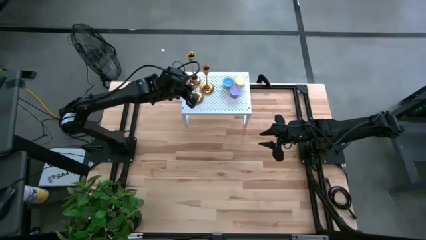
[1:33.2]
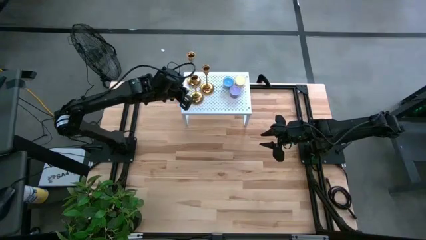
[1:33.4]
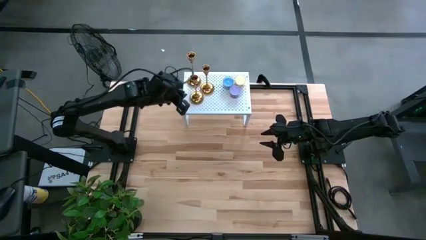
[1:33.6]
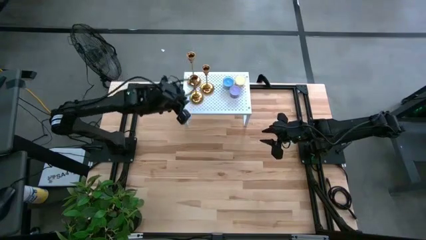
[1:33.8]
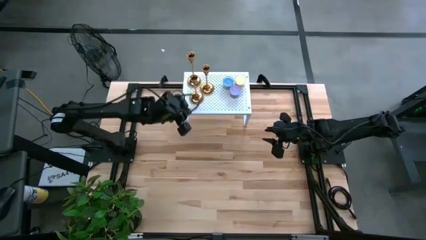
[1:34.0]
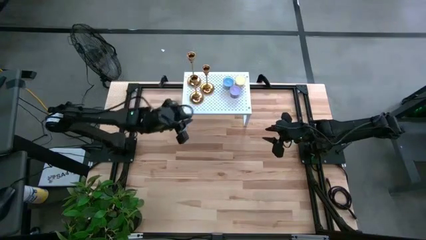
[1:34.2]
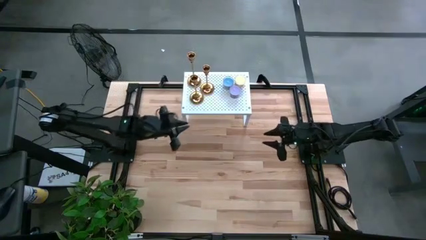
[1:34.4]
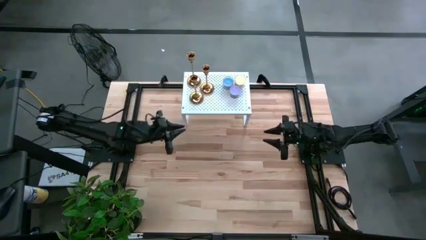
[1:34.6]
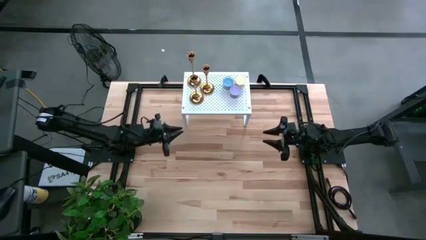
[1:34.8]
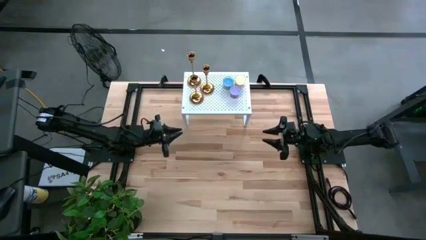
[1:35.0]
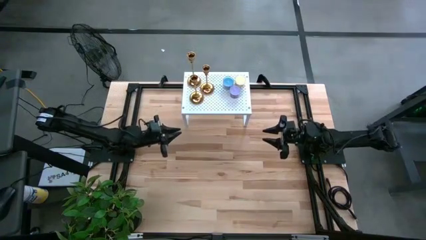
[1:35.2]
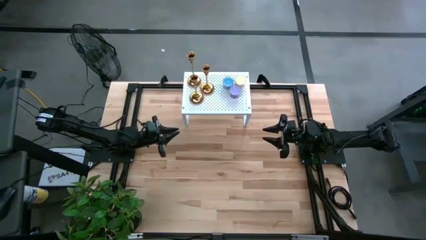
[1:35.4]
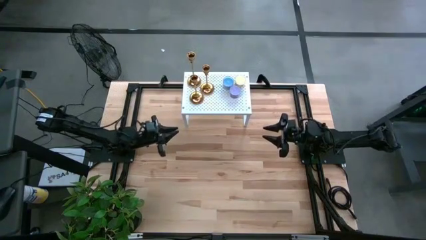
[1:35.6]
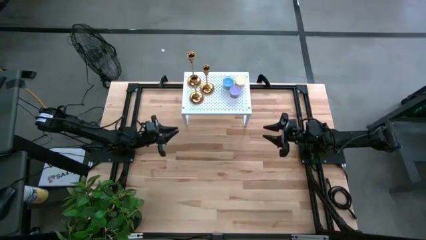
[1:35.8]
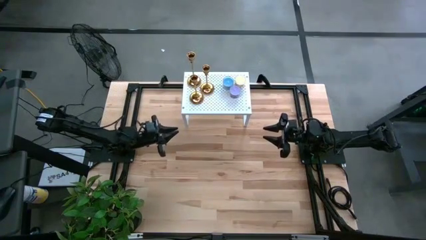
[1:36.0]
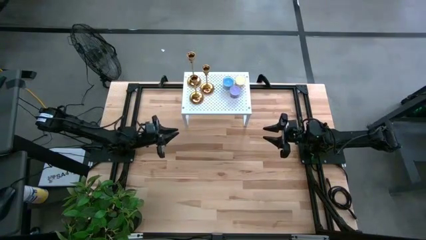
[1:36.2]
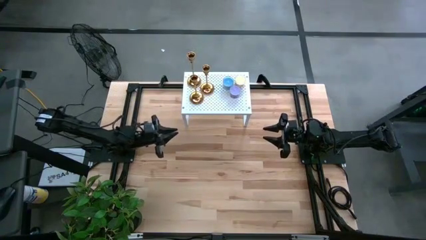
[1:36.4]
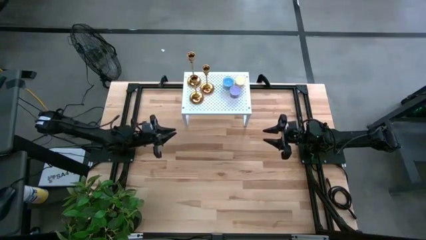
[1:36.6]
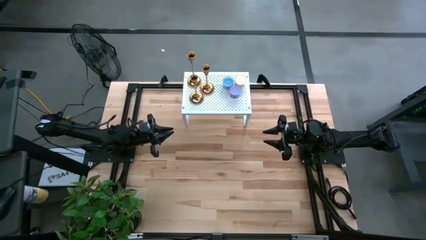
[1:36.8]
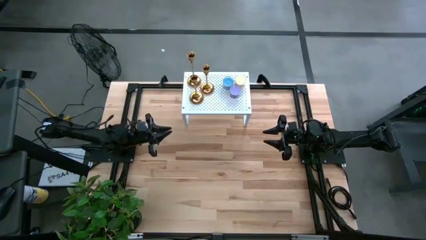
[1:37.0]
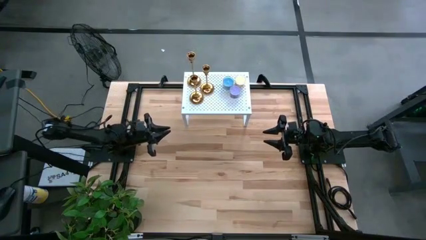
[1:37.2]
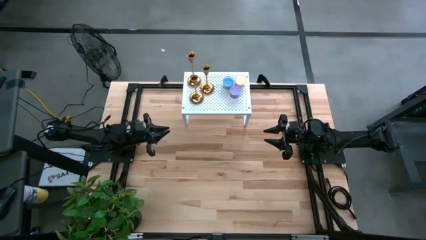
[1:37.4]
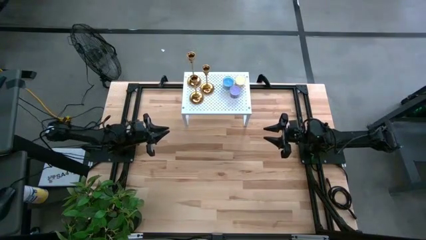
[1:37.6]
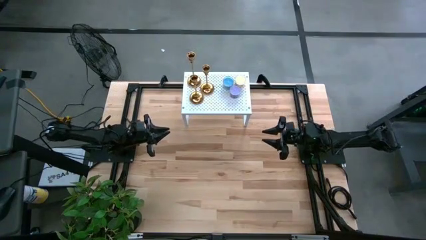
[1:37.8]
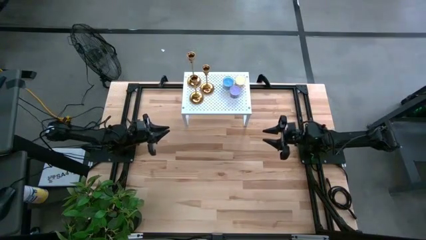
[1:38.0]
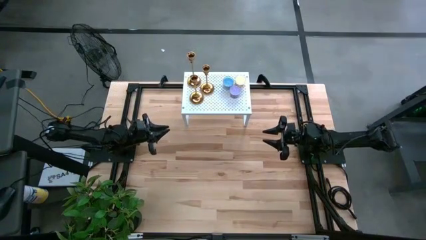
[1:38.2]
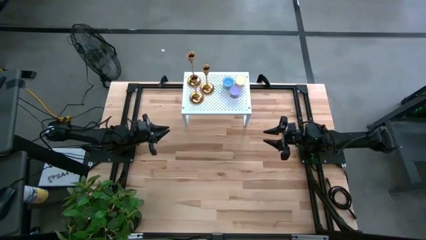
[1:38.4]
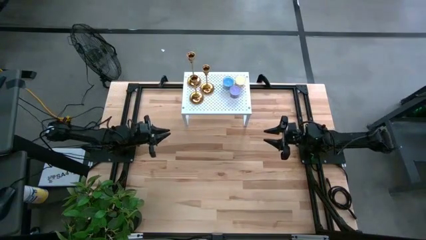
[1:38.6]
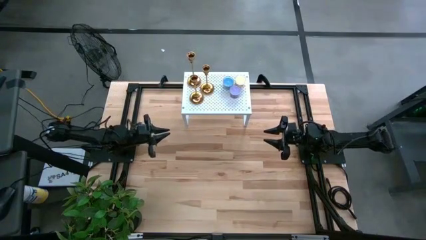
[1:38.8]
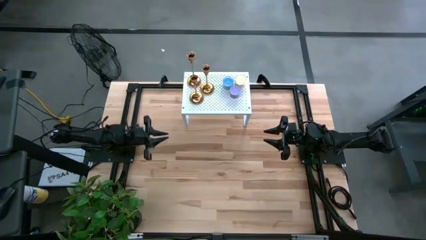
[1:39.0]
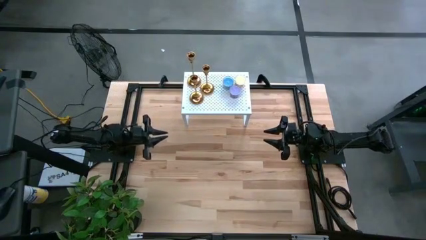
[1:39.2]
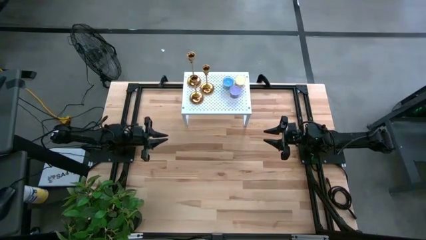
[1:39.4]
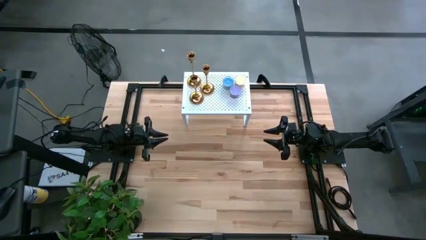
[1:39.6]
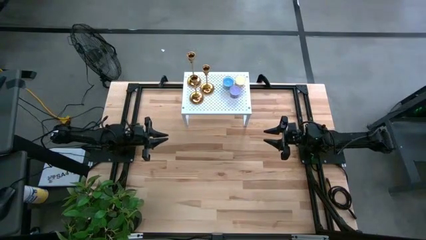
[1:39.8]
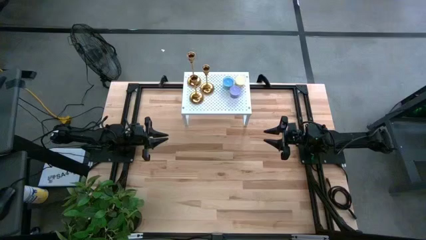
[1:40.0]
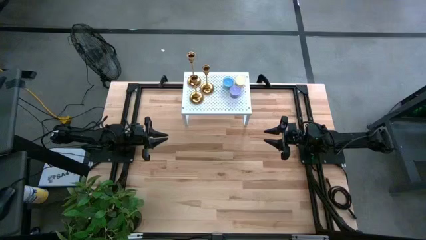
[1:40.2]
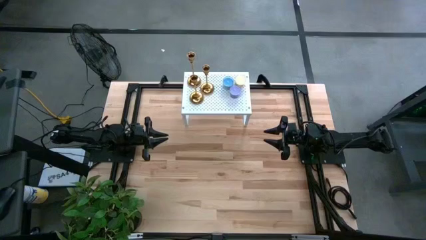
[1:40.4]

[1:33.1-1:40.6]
Task: Pick & Place candle stick holders
Return to Home Position

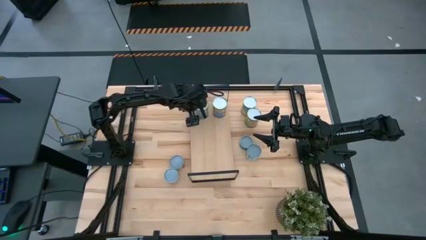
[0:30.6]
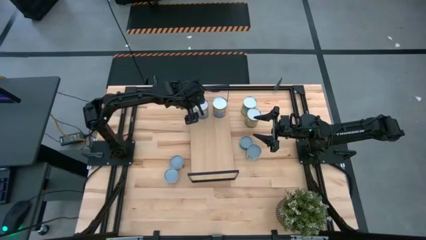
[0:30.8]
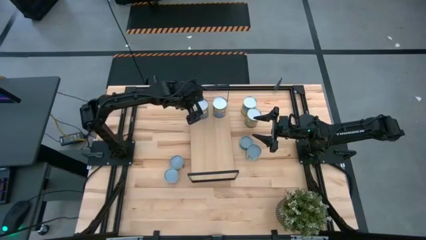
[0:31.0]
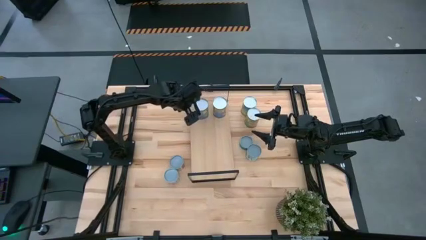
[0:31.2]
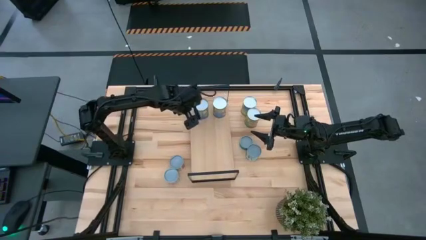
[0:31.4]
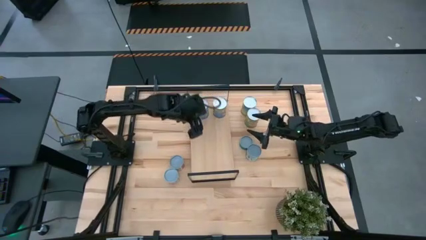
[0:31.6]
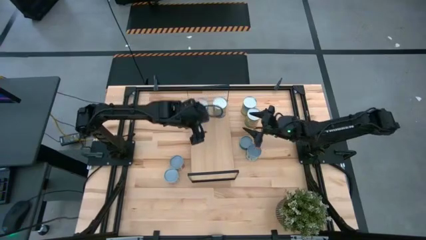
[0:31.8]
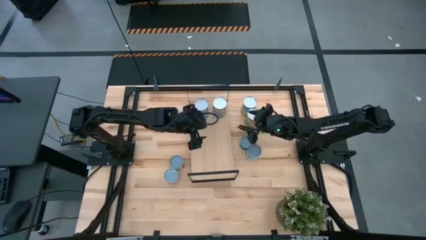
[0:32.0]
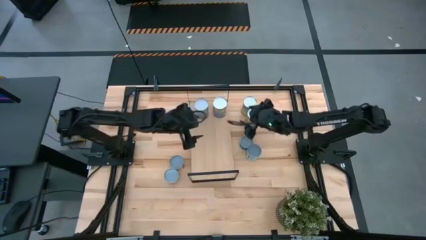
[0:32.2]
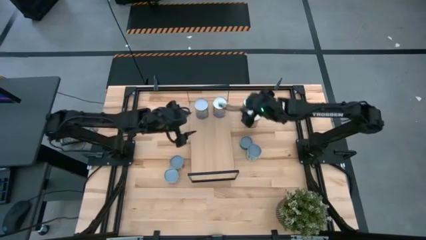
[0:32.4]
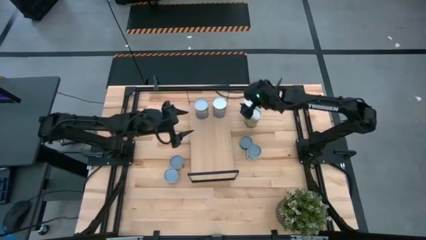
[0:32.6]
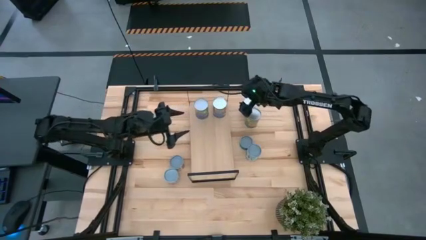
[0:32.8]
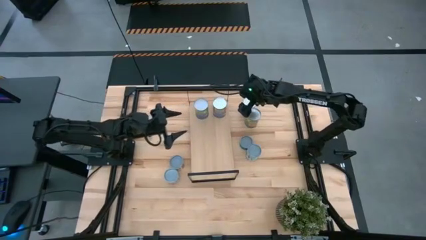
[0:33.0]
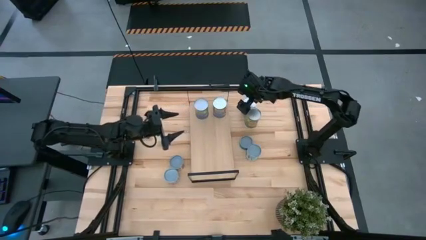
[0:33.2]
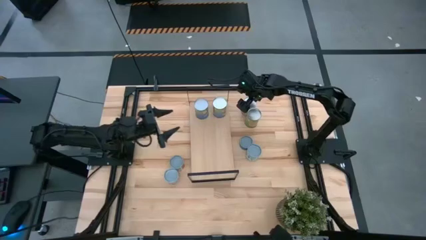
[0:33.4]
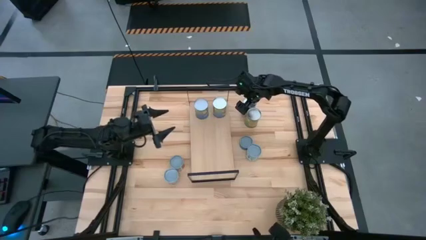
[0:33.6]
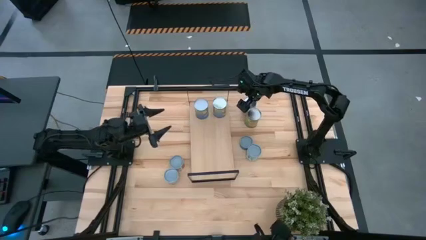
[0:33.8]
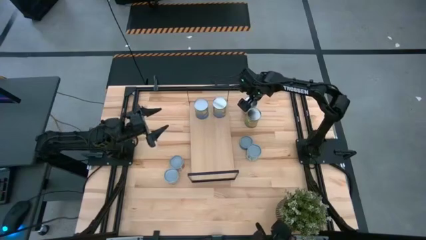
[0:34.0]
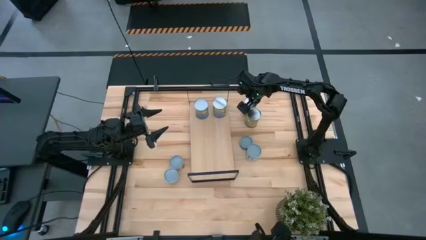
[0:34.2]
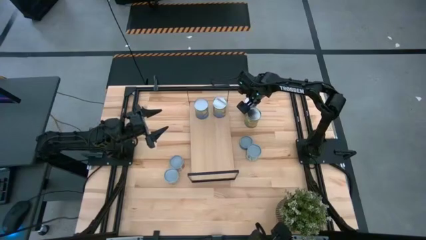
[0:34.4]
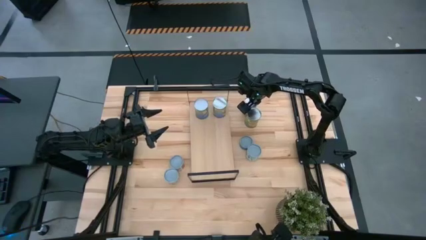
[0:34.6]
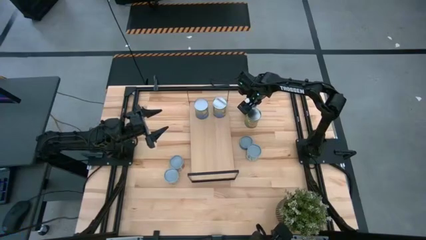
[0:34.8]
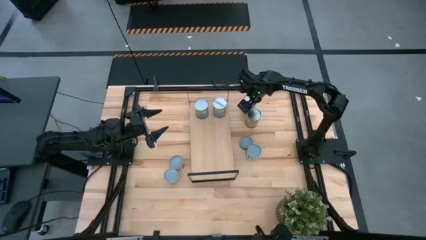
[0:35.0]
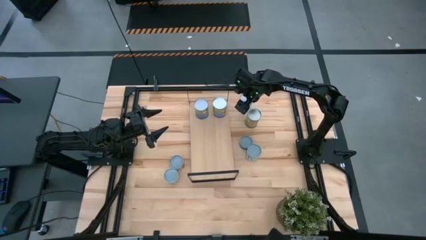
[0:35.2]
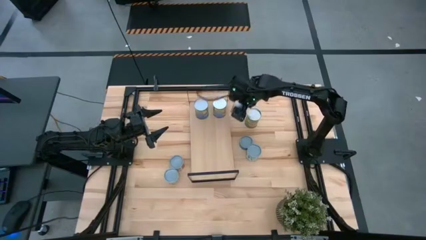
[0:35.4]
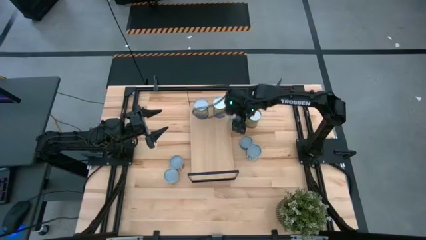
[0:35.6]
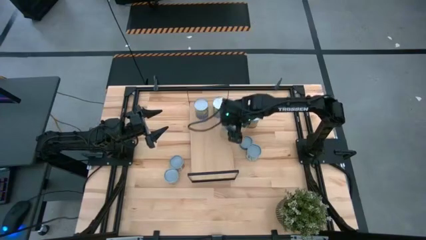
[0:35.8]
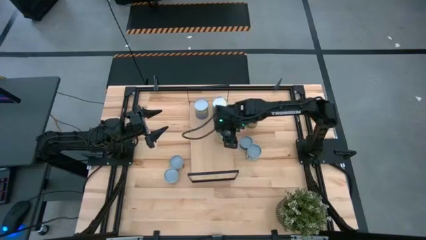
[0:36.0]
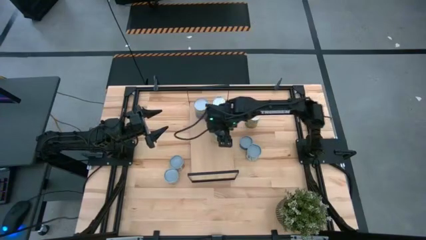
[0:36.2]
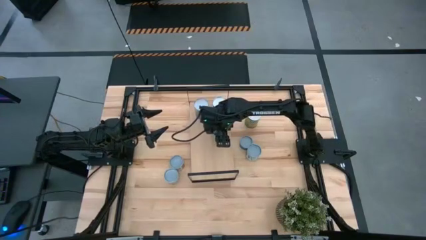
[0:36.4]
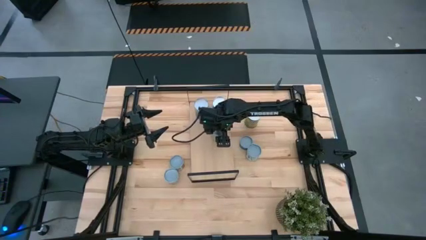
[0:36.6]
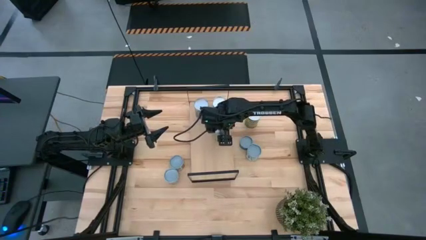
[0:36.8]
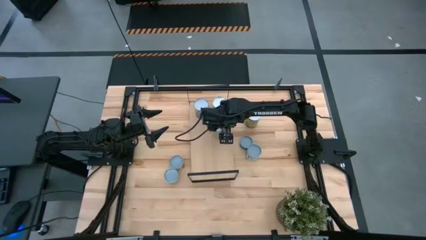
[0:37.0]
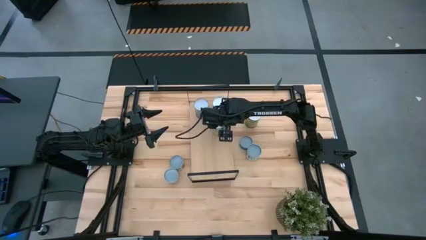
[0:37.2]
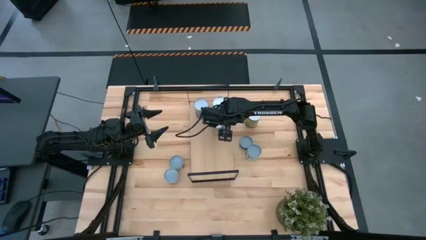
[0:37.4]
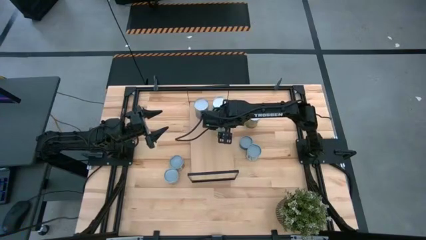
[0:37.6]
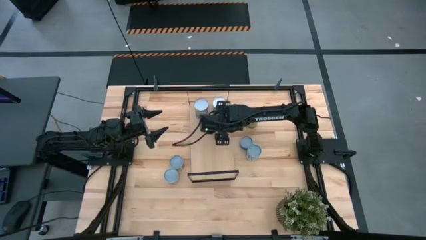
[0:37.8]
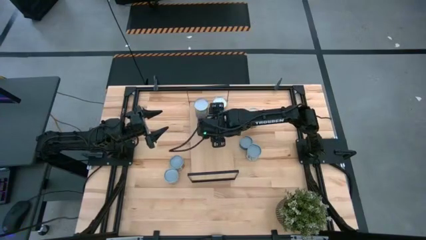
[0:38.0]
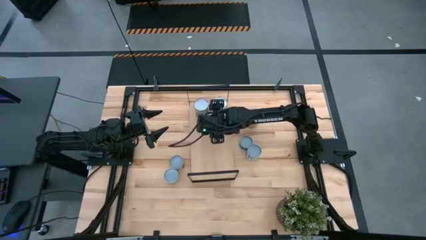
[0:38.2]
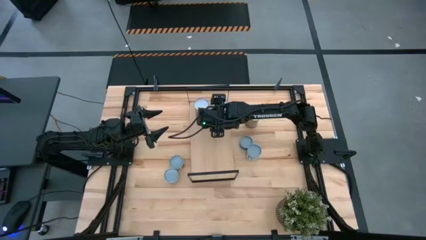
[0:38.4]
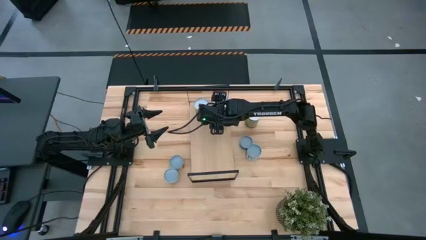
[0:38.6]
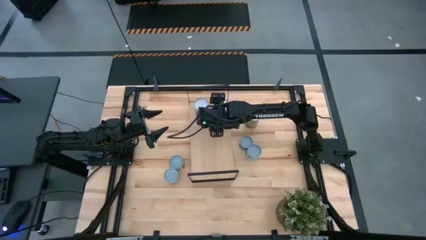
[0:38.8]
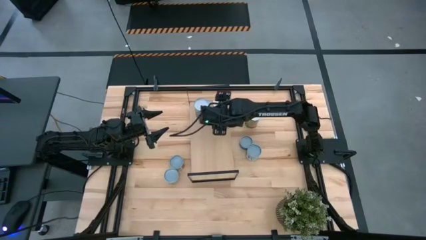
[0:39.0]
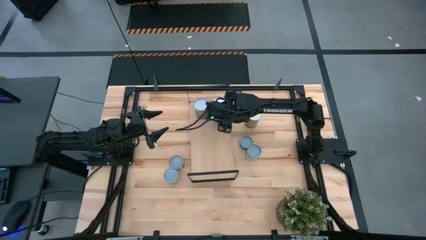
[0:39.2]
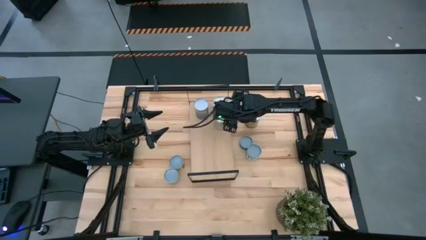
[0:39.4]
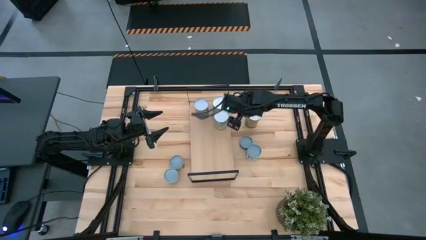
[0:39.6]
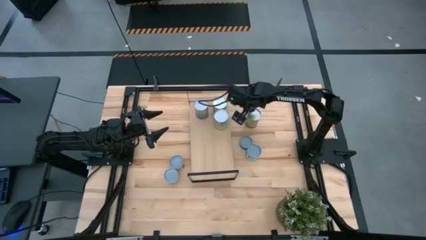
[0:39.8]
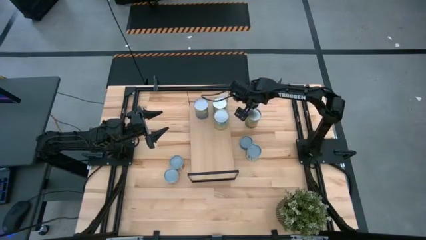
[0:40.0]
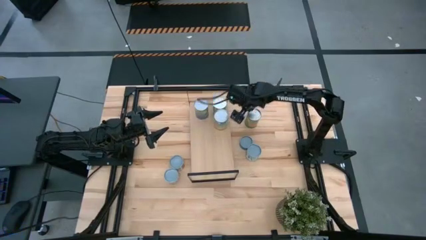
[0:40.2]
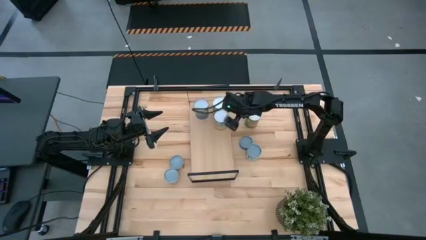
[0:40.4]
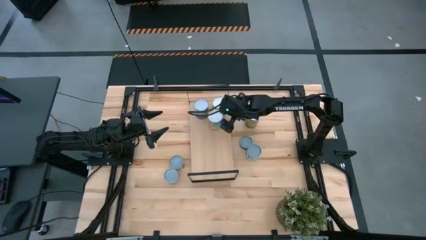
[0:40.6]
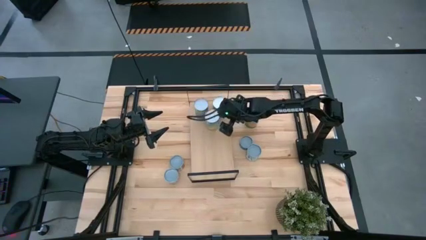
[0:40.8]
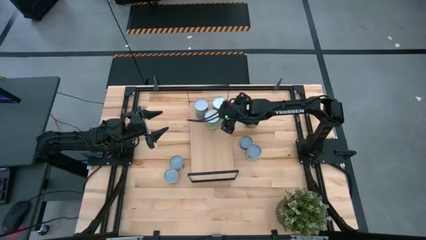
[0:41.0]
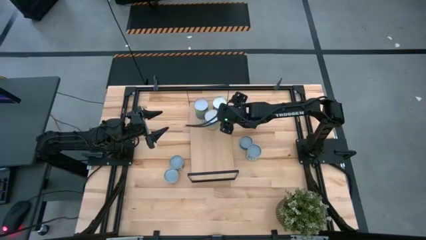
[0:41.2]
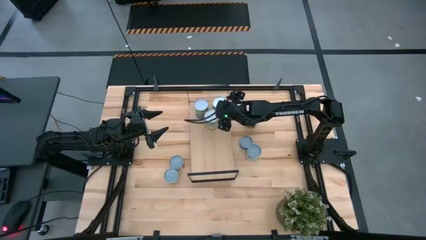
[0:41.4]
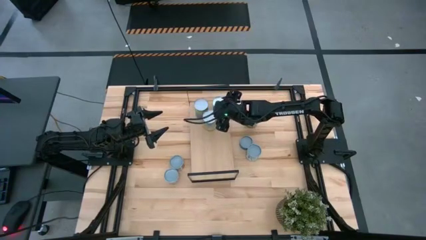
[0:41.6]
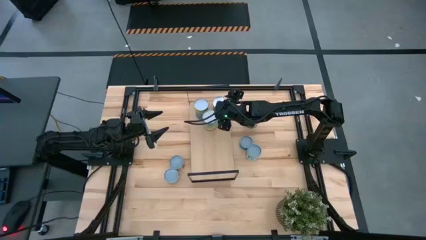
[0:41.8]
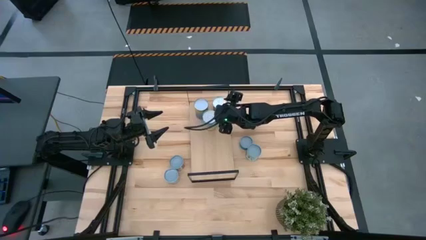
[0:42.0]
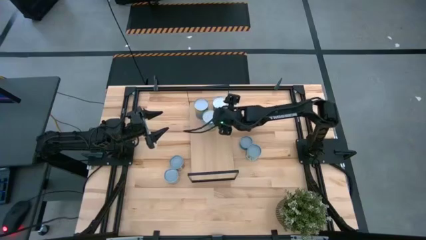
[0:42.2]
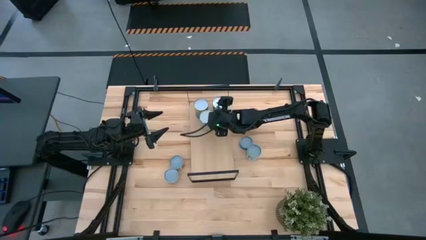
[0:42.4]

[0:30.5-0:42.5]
Task: Pick and place cans onto a shelf
Put the canned carrots on the shelf
